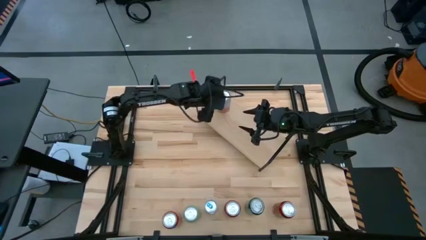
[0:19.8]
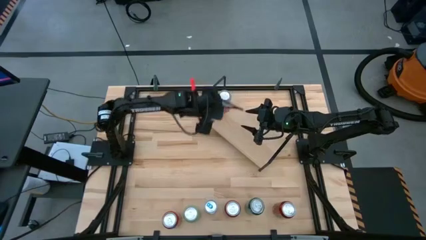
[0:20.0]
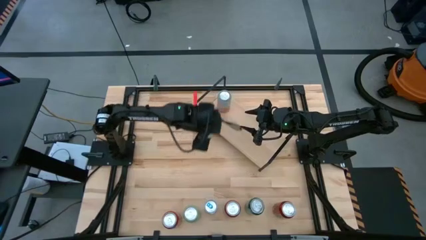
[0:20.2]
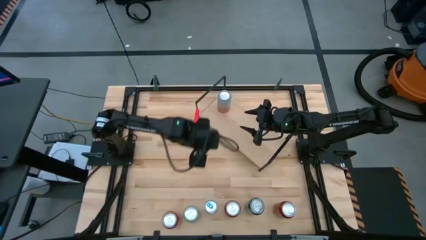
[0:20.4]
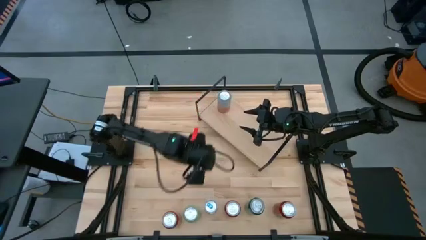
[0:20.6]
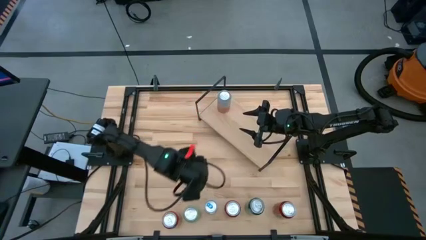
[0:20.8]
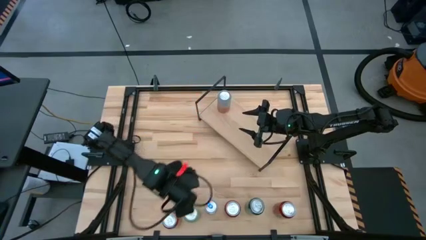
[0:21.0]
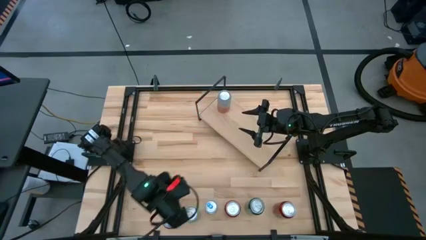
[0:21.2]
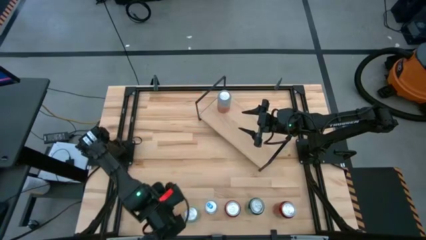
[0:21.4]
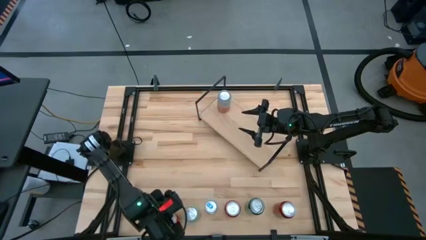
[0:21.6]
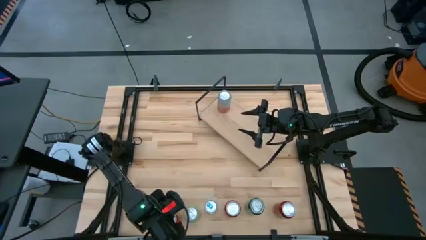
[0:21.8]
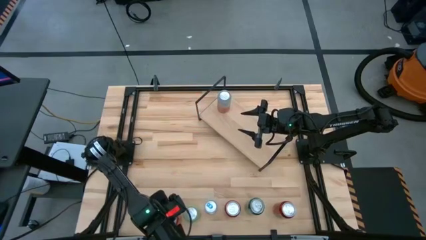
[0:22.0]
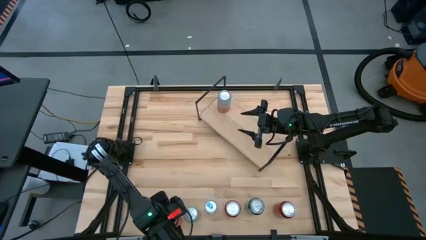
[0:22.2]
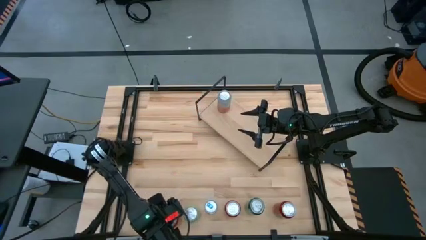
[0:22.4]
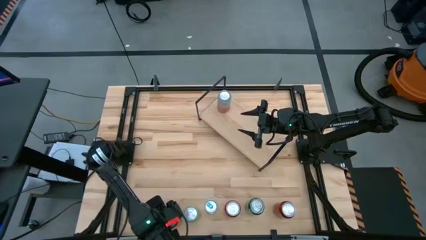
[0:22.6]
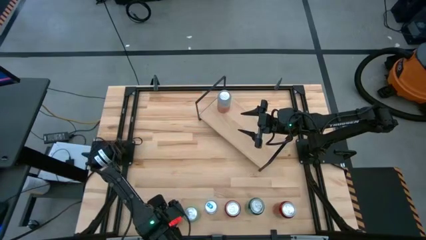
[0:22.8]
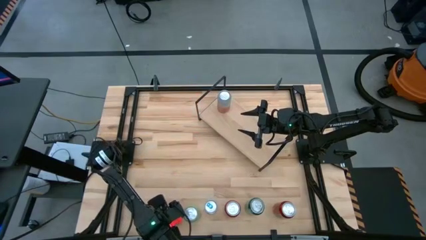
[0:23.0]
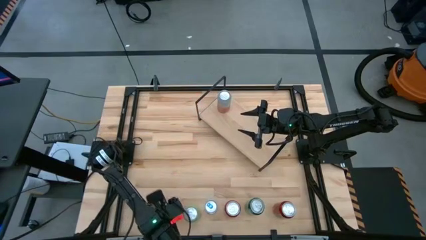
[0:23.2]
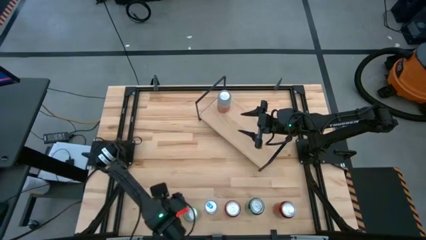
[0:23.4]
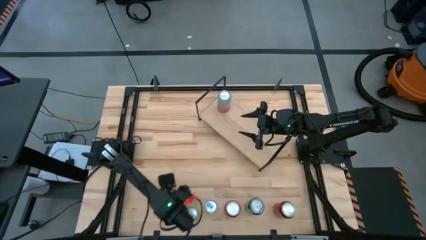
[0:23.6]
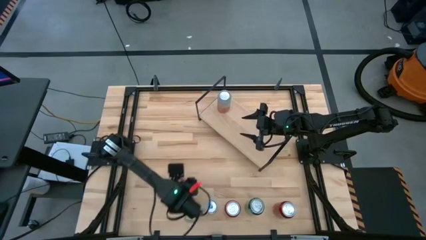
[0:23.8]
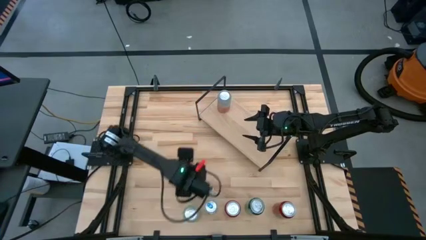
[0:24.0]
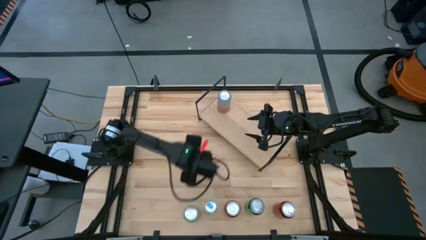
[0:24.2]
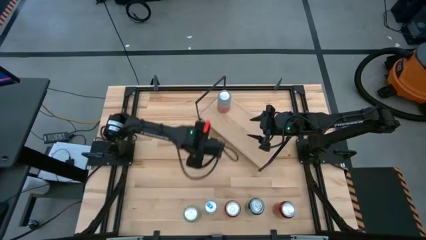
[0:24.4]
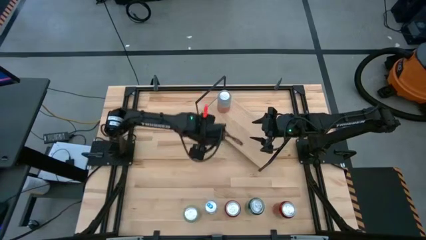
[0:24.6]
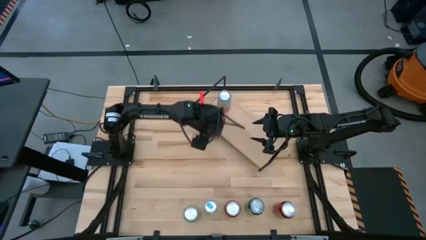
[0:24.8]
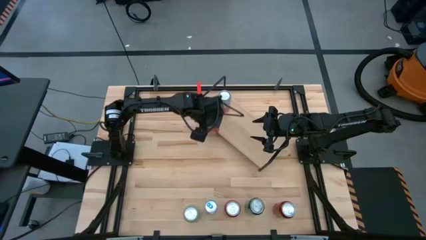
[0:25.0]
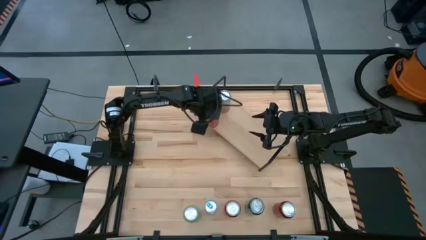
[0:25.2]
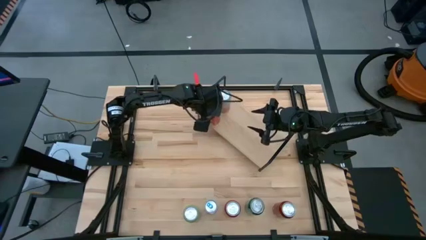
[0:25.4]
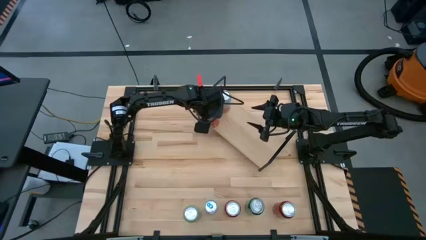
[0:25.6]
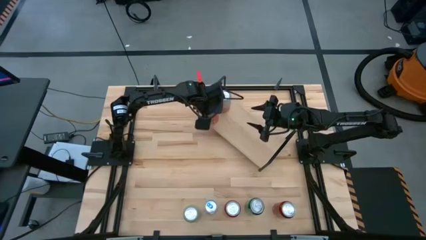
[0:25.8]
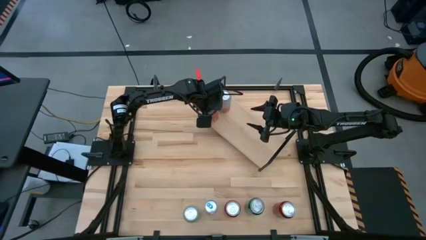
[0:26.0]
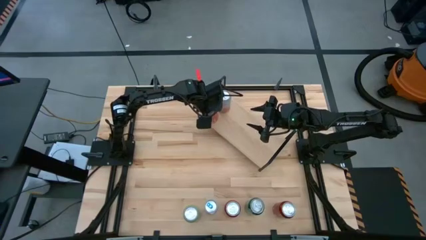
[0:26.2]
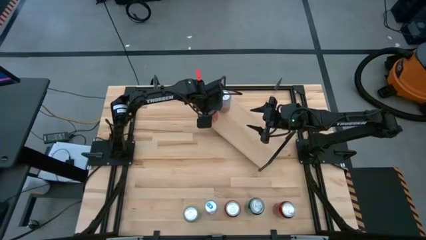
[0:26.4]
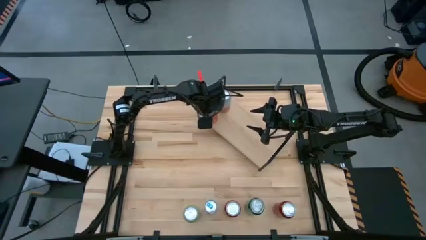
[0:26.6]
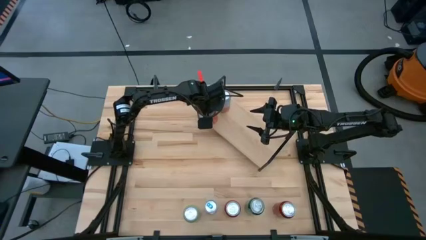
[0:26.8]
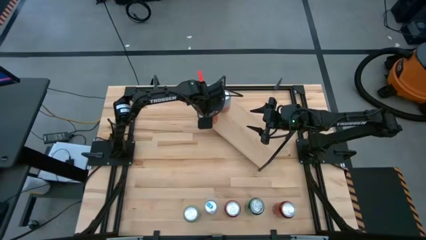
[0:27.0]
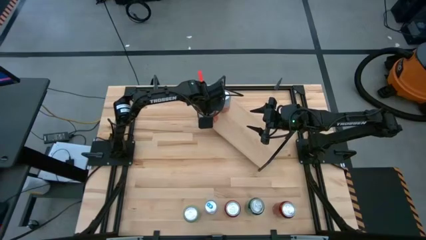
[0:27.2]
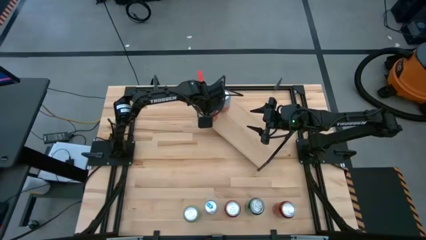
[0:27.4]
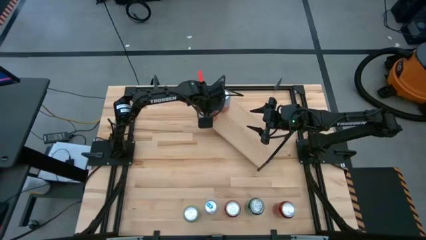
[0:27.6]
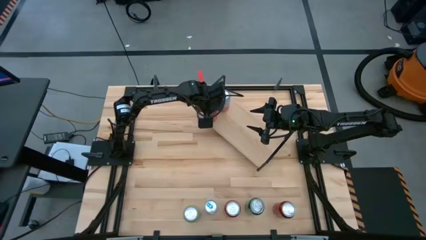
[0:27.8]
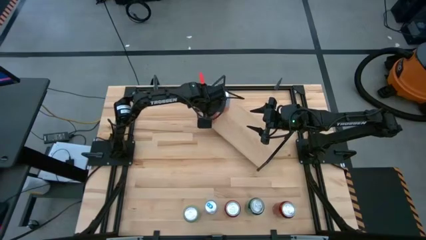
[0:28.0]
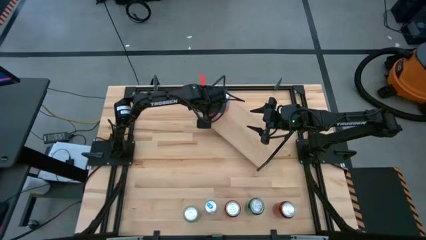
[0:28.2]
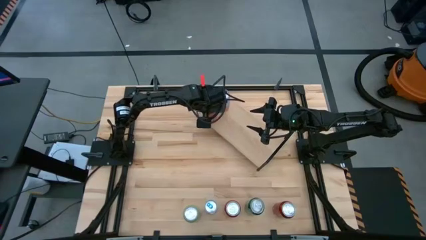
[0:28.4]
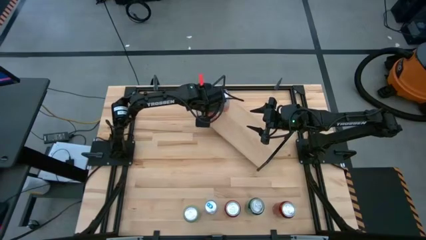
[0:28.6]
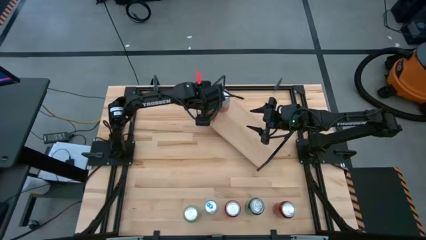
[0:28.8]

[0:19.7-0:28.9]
Task: Place canned beverage on shelf
Put the orange soda can on the shelf

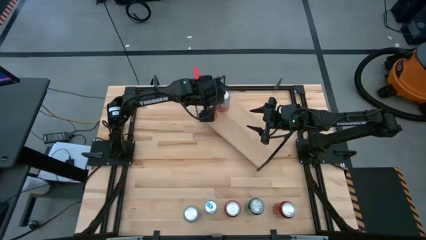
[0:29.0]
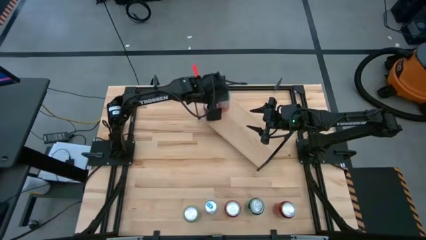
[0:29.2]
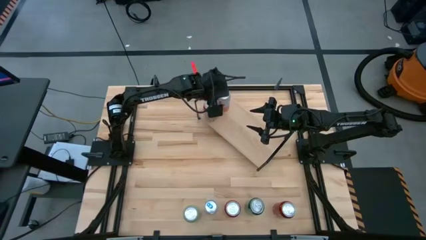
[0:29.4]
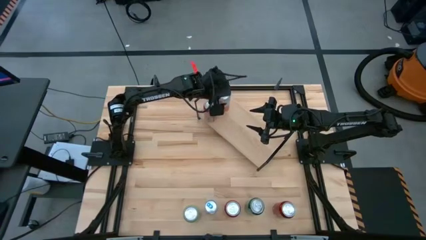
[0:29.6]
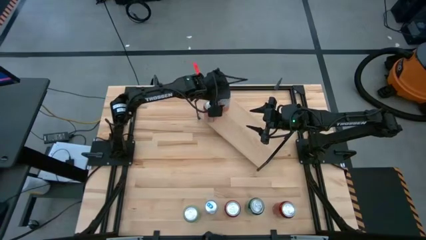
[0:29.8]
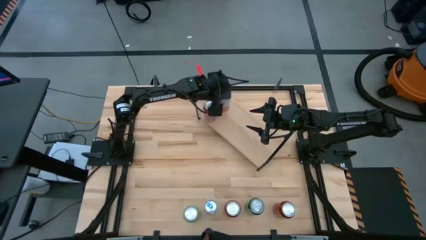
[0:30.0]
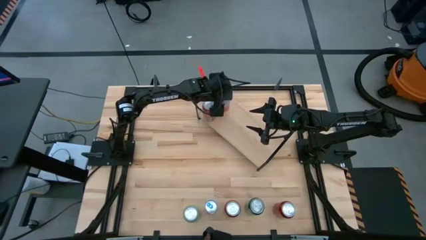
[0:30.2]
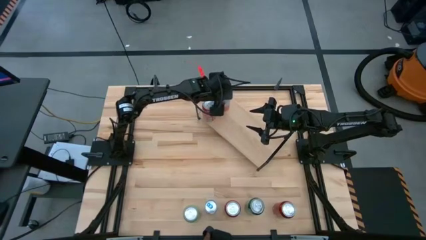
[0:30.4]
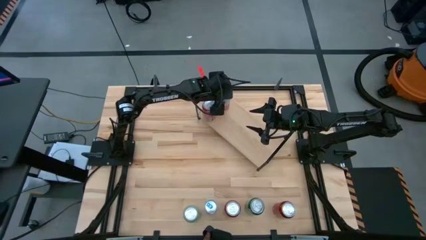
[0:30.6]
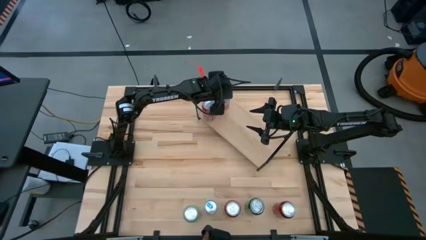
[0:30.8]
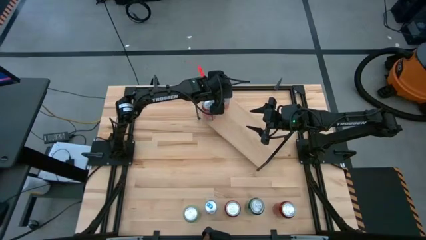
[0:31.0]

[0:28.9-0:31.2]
Adjust the white soda can on the shelf
